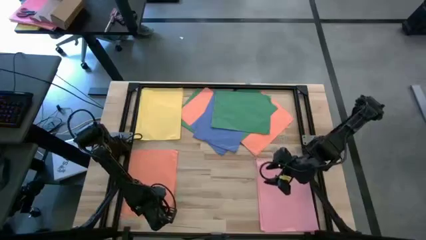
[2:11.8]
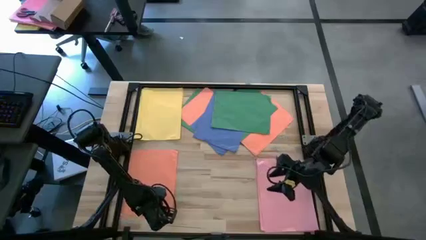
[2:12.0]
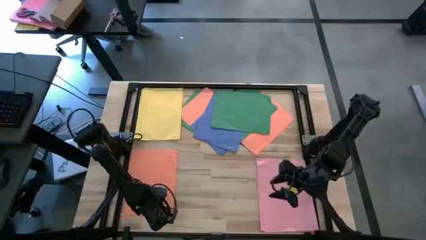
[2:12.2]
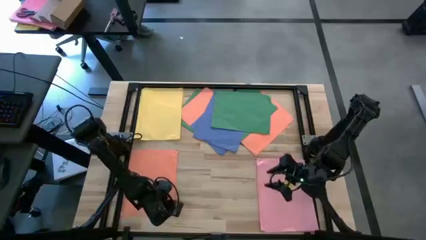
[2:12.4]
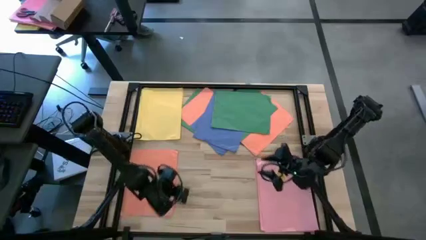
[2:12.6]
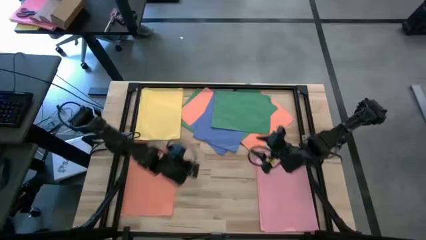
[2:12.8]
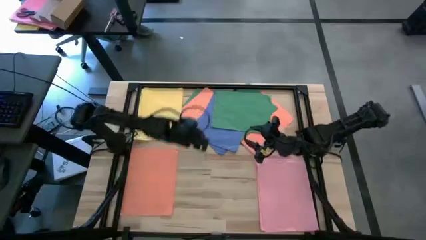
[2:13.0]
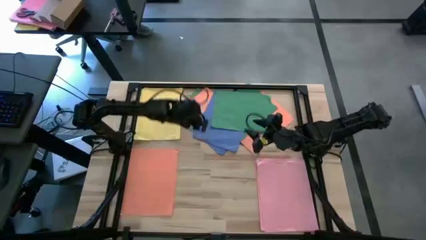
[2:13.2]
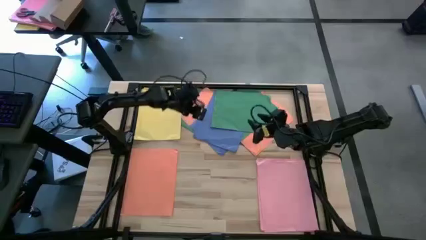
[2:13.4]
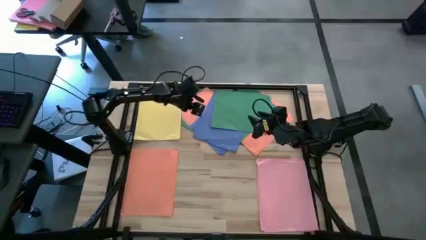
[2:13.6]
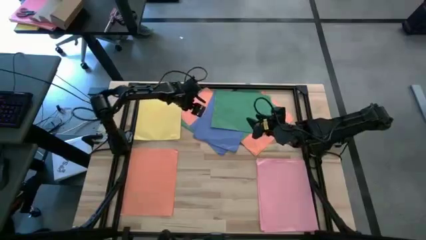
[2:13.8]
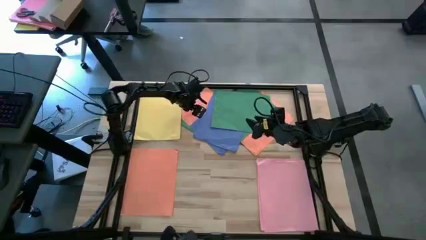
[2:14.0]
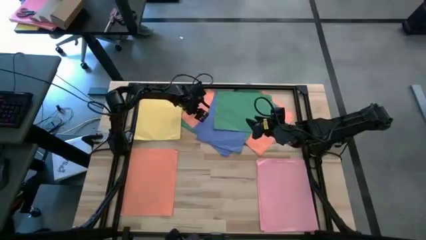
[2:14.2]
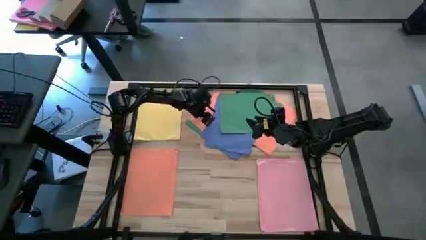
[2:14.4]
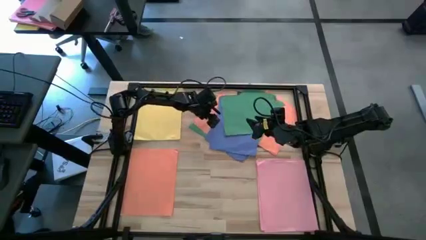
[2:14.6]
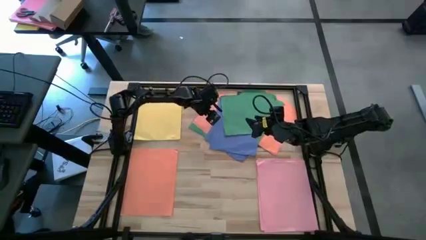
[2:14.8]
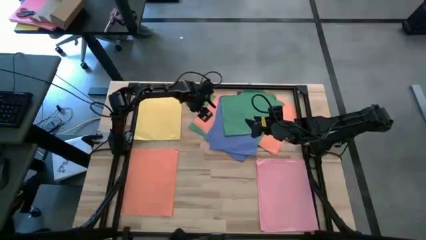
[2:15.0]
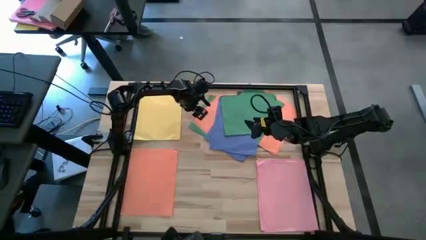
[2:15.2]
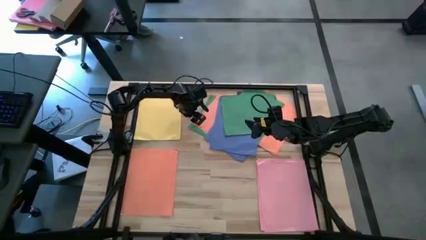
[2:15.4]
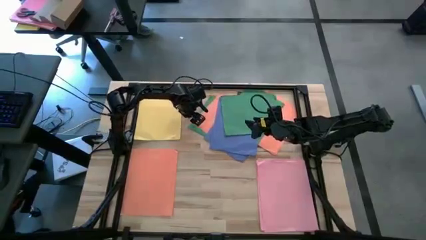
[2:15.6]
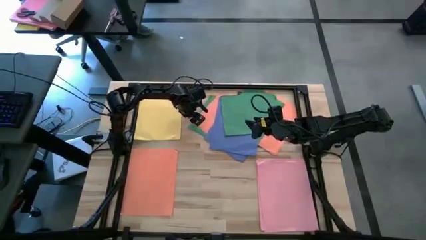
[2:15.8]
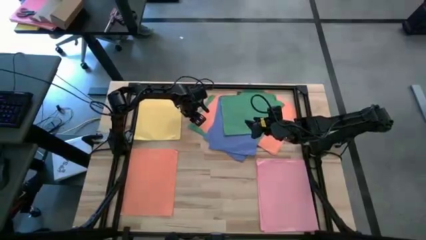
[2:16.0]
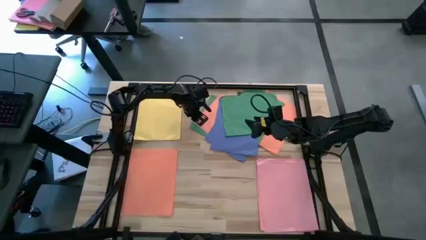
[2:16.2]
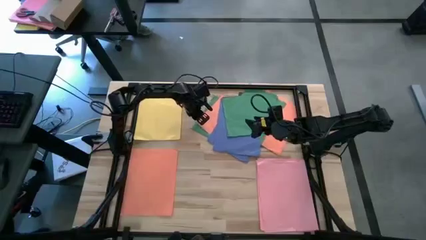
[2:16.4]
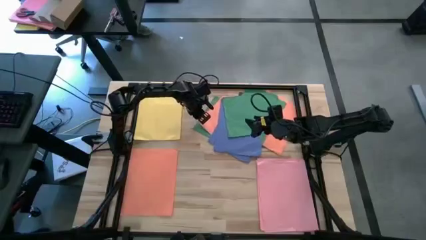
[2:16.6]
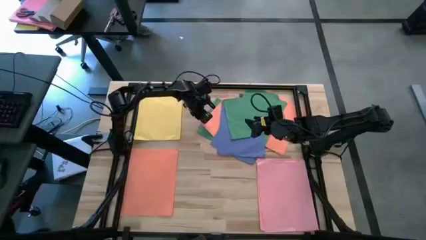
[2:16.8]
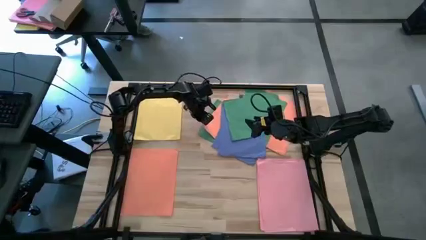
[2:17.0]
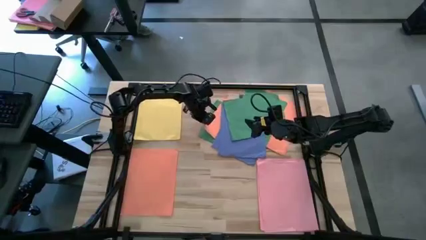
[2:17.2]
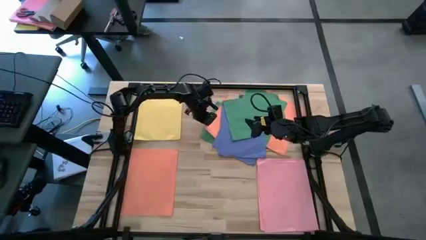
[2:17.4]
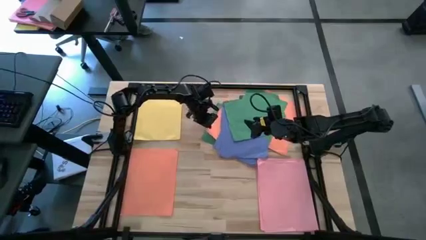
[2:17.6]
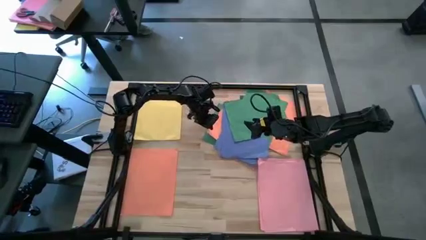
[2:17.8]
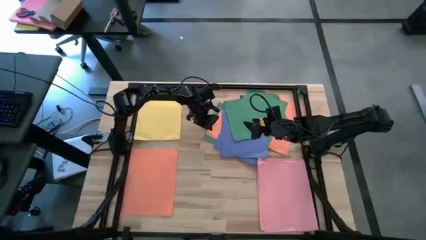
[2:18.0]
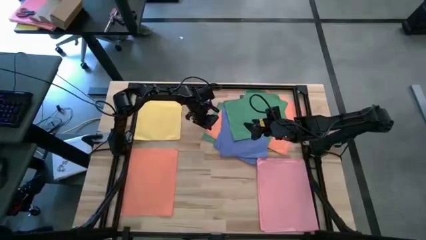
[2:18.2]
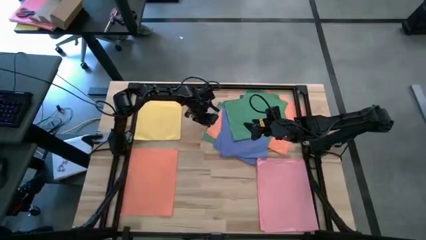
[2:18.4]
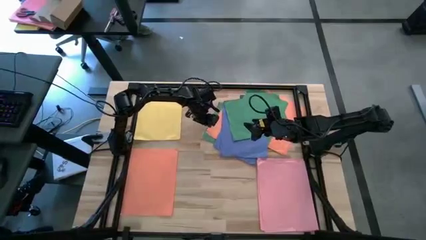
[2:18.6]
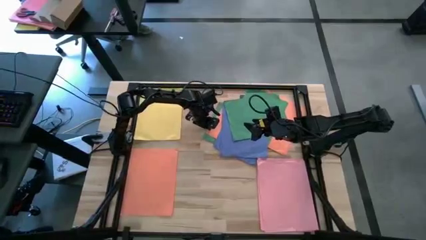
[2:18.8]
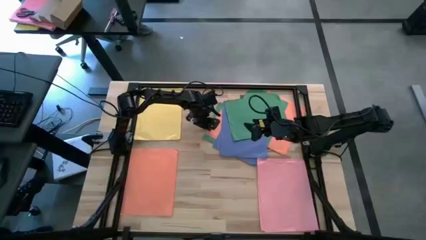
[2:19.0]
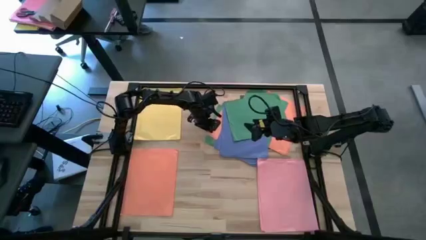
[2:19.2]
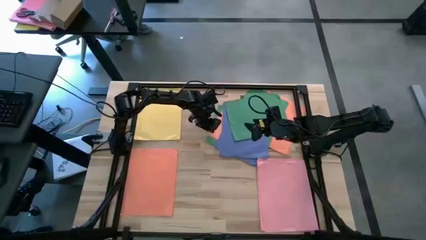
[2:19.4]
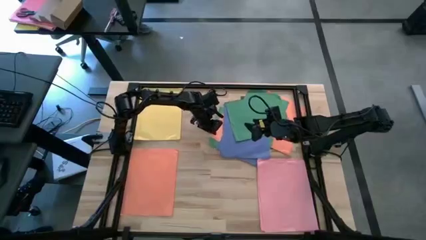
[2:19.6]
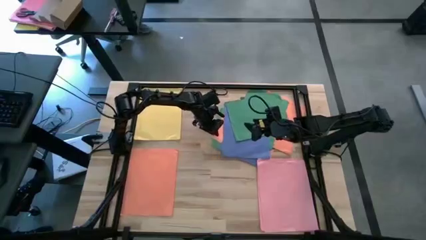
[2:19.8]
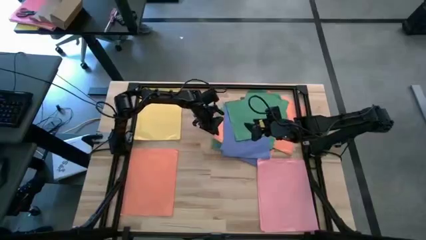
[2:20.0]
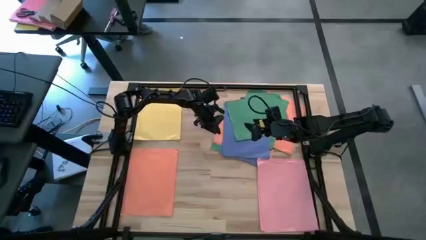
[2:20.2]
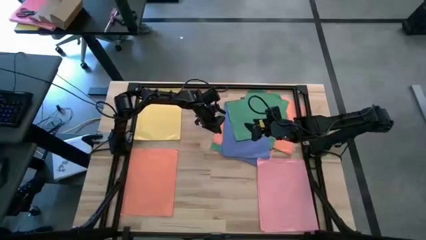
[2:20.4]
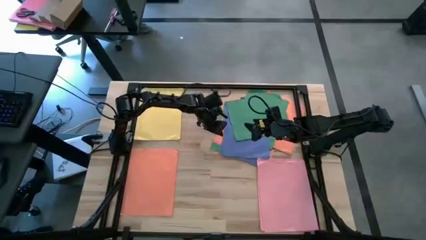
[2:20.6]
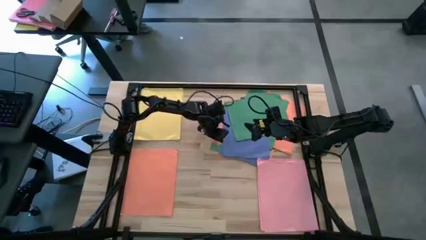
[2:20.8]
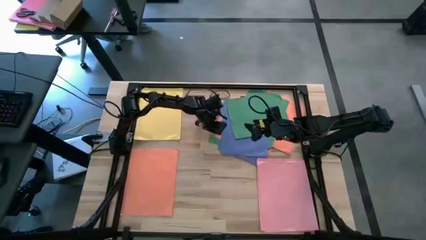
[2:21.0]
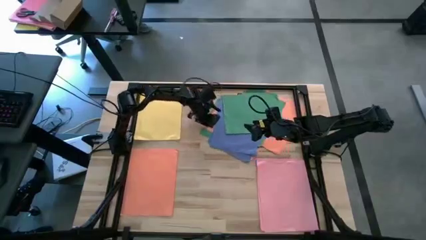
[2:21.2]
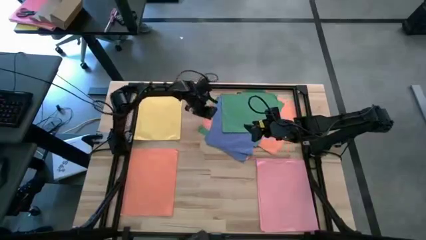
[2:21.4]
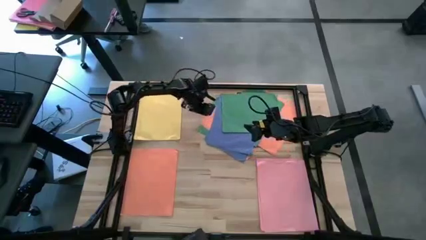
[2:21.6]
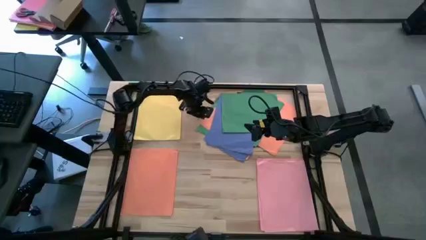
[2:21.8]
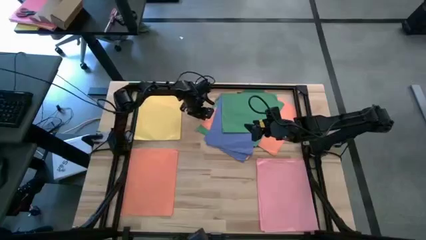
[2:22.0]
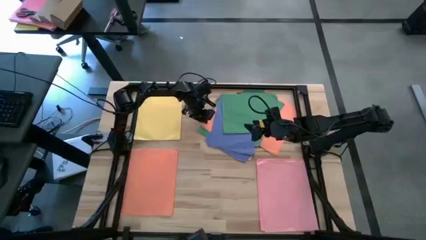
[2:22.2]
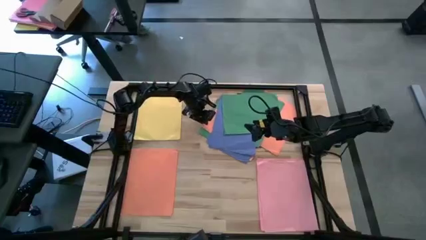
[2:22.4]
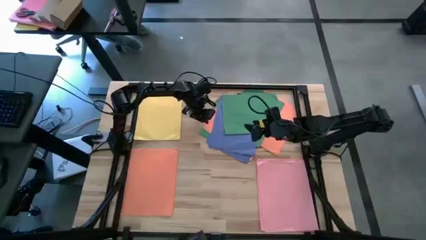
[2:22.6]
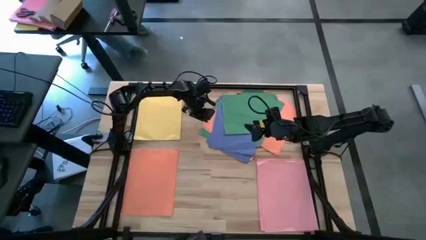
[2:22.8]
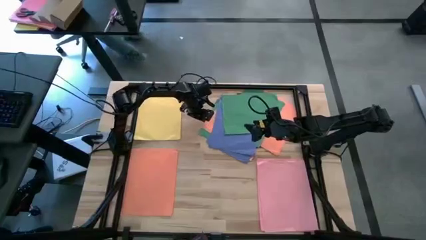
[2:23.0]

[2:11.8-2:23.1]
Task: Organize paper
Stack the orange paper on top of the other orange paper

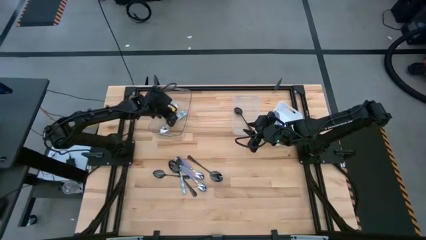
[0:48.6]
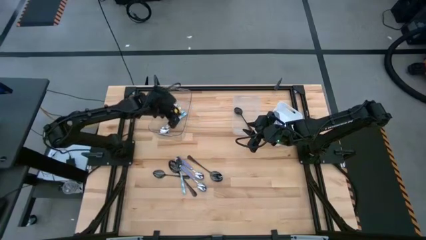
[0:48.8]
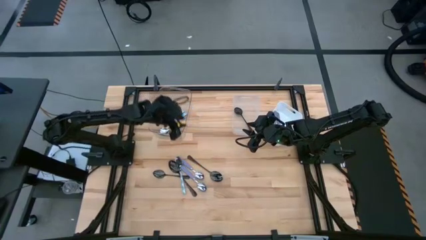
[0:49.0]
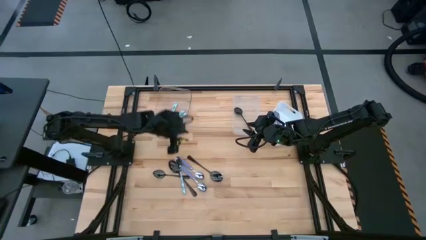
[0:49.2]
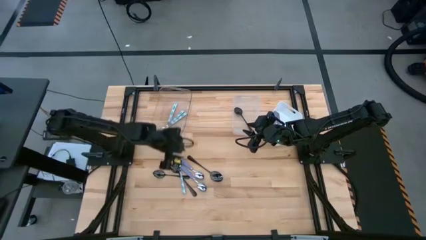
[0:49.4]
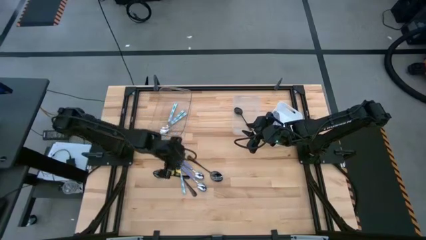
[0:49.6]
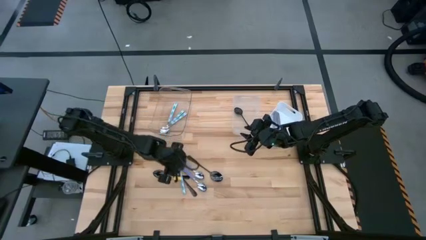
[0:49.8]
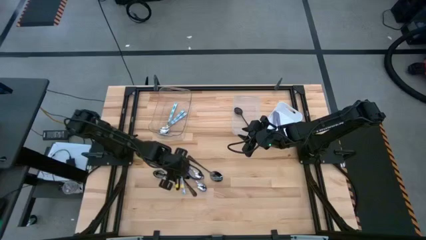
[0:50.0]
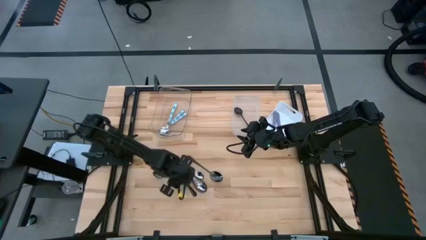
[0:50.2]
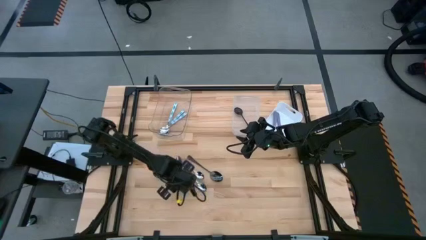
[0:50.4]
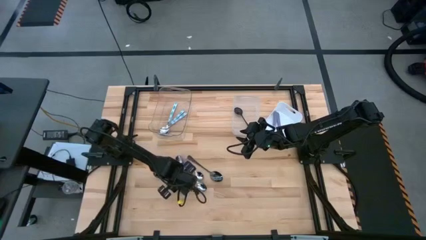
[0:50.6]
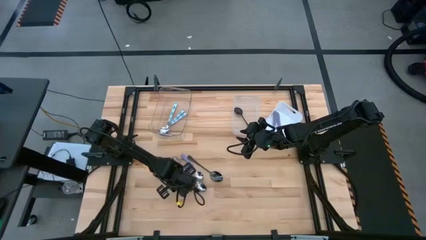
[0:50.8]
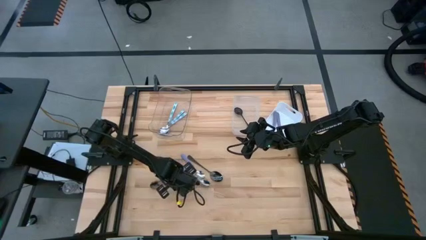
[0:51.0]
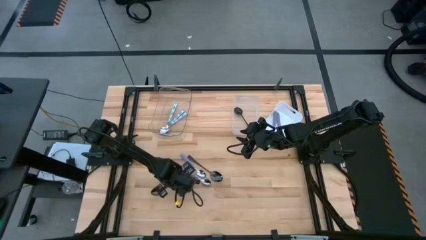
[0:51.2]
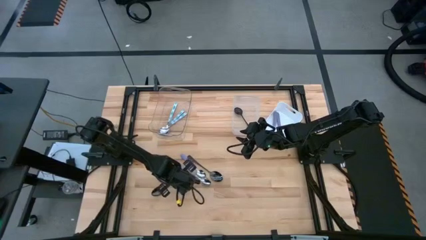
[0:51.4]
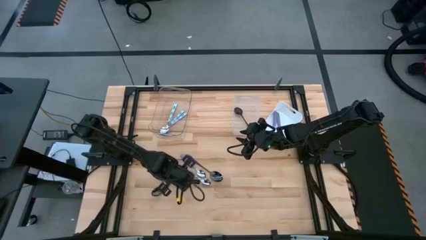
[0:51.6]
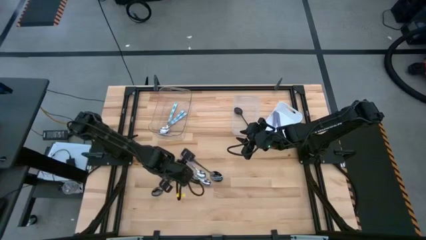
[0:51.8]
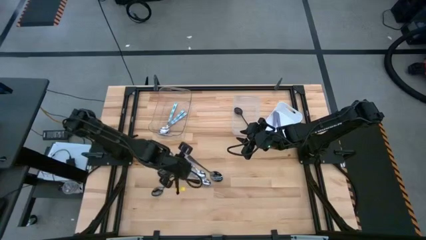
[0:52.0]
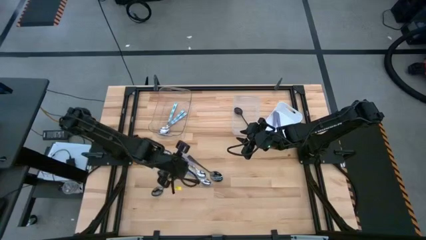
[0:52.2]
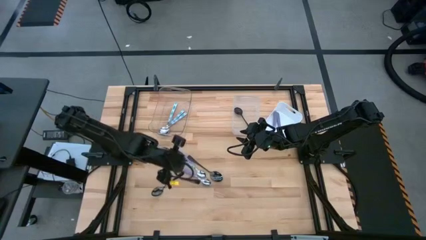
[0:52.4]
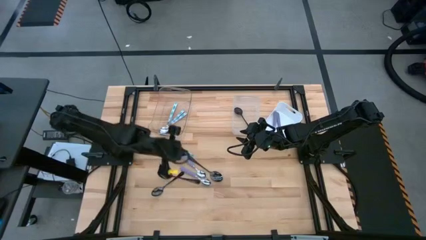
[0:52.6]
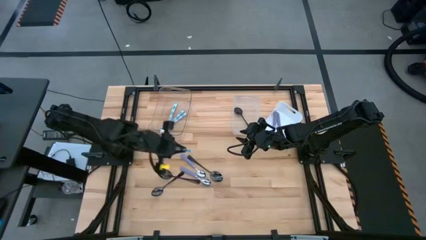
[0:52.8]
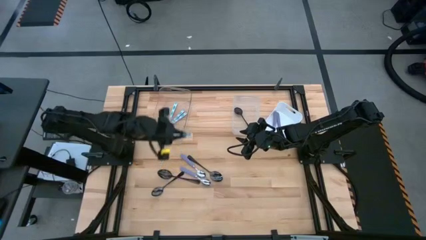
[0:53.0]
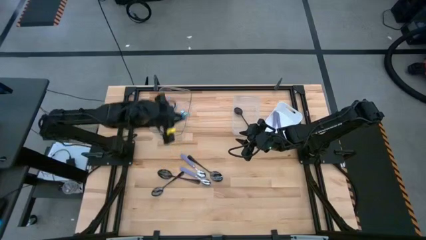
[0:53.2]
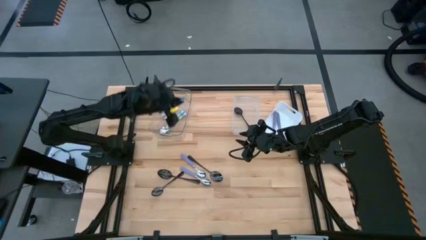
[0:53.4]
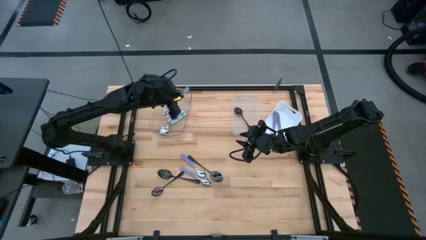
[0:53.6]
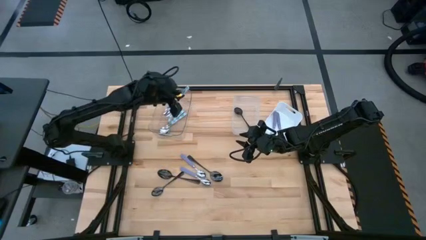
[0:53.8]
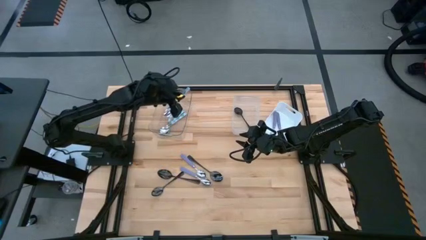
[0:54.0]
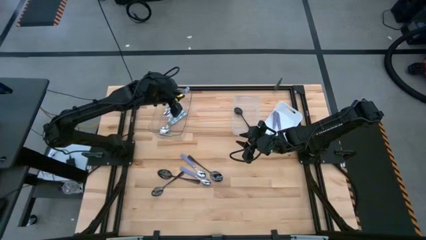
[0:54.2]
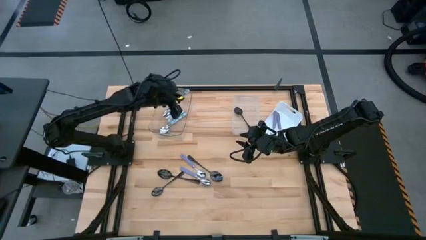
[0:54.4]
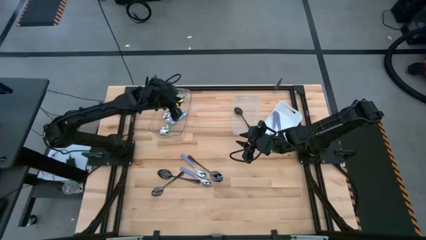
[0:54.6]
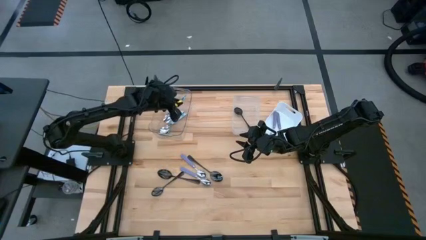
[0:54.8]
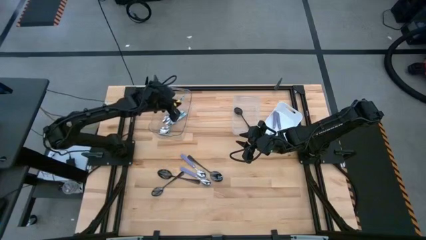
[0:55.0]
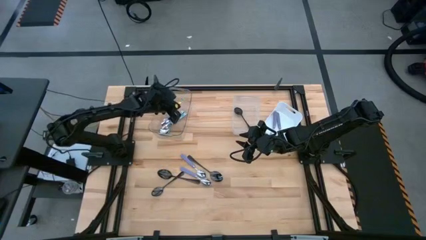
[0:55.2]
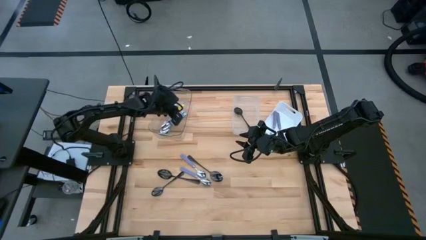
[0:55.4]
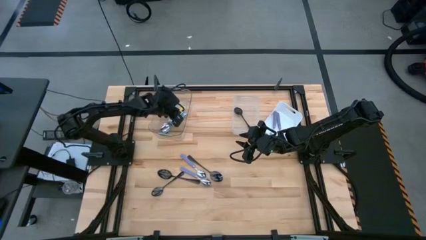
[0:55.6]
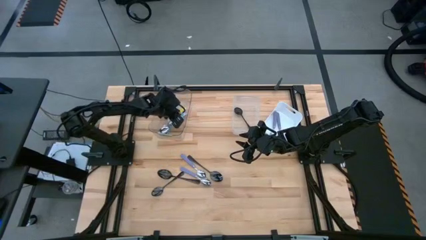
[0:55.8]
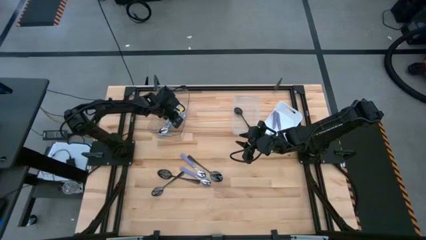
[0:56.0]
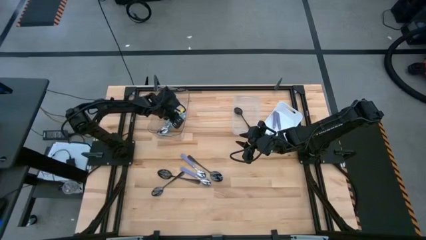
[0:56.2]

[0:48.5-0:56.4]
Task: Sort silverware by color (type)
Put the green pattern spoon into the transparent bin
